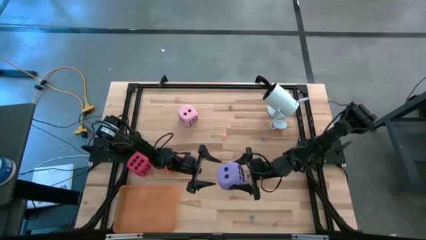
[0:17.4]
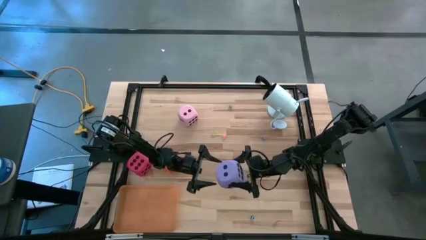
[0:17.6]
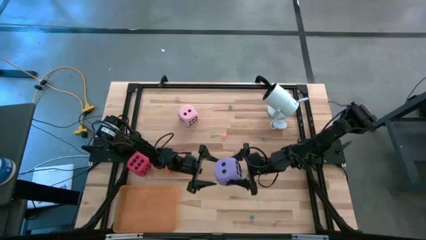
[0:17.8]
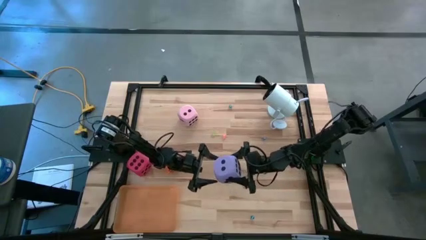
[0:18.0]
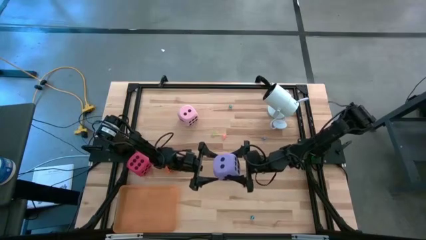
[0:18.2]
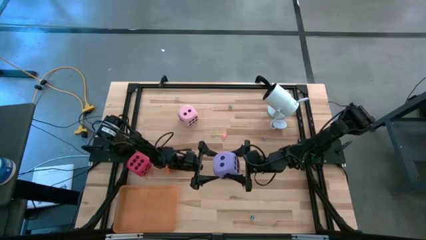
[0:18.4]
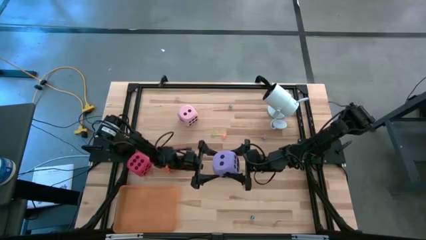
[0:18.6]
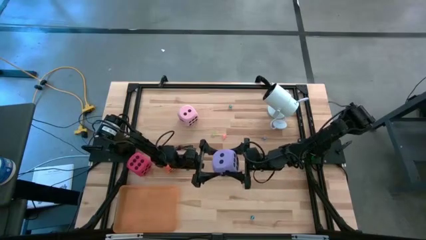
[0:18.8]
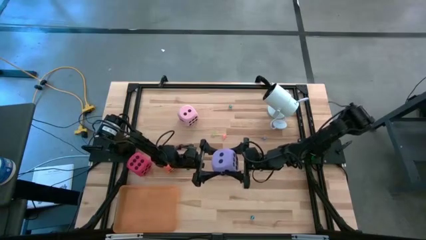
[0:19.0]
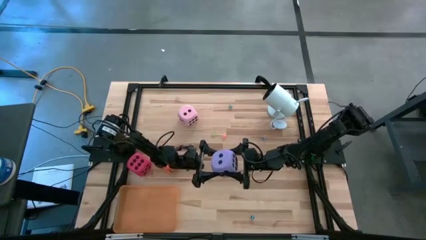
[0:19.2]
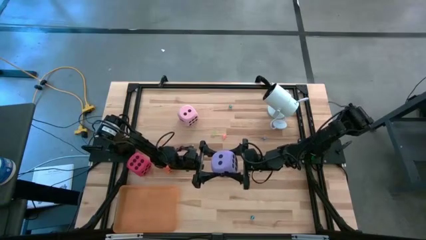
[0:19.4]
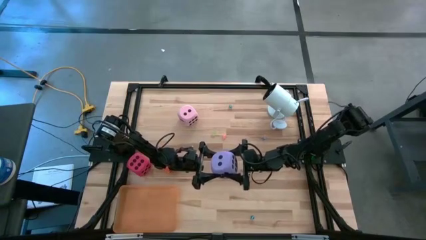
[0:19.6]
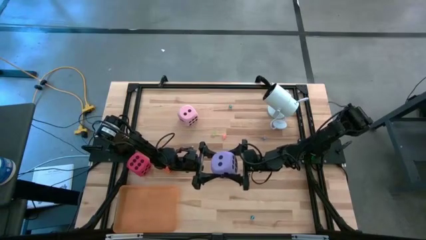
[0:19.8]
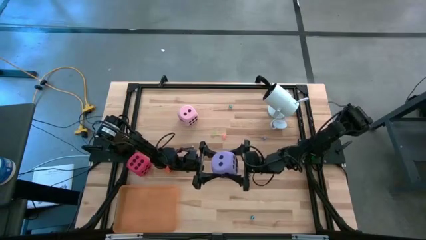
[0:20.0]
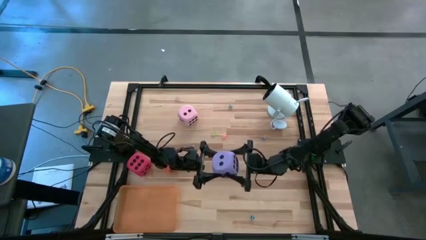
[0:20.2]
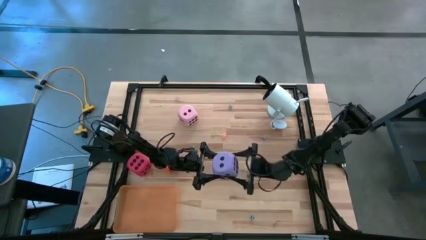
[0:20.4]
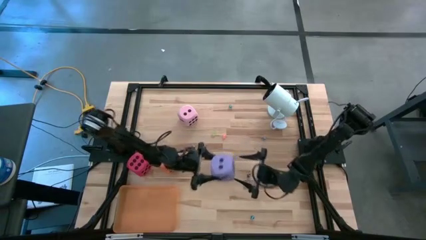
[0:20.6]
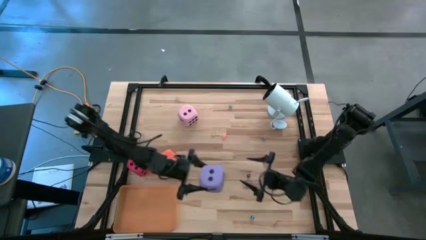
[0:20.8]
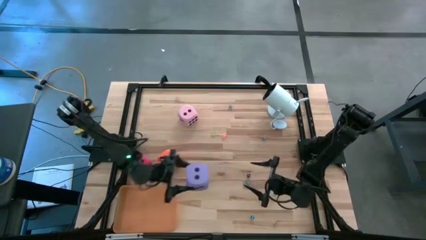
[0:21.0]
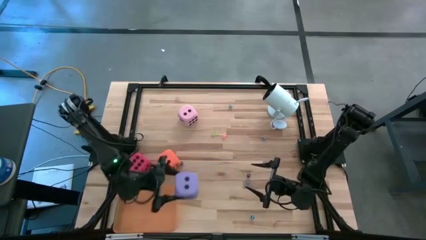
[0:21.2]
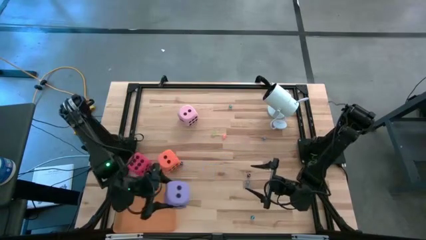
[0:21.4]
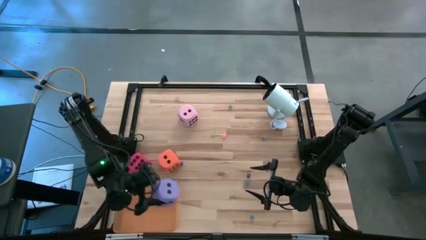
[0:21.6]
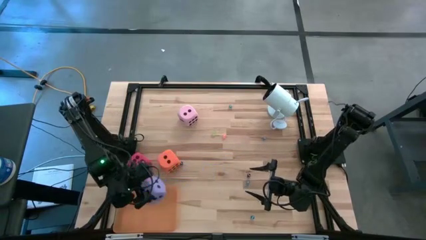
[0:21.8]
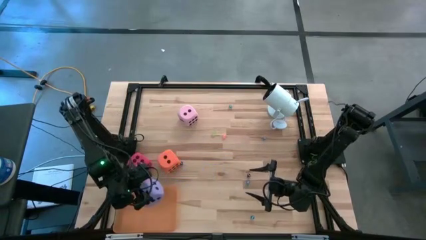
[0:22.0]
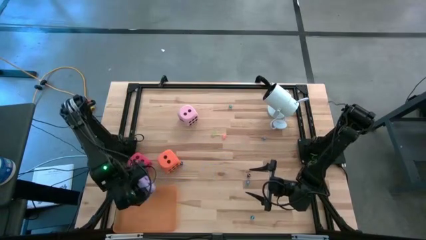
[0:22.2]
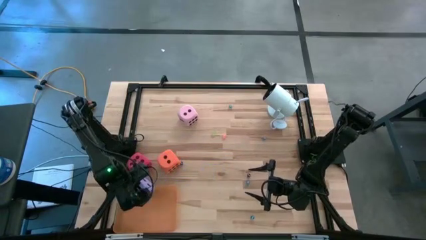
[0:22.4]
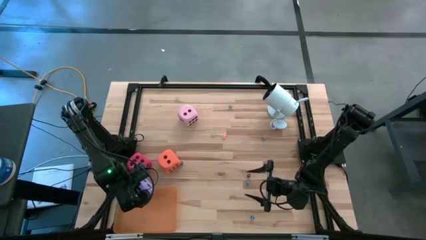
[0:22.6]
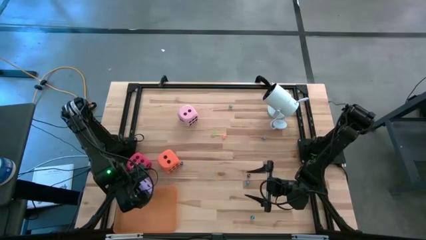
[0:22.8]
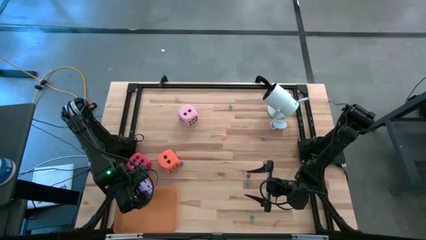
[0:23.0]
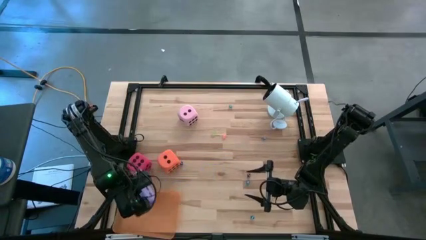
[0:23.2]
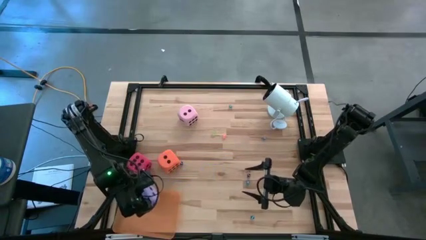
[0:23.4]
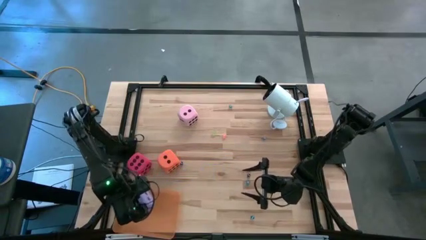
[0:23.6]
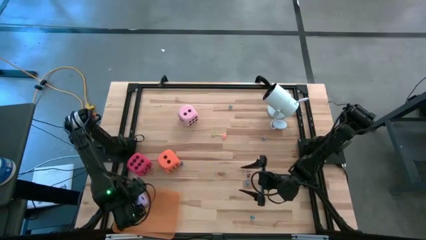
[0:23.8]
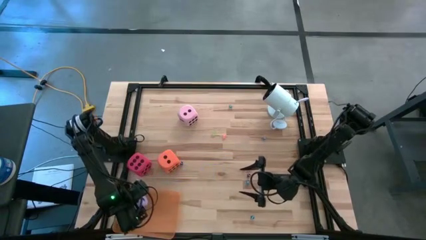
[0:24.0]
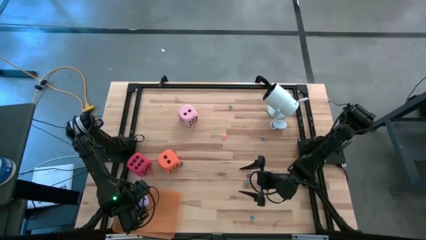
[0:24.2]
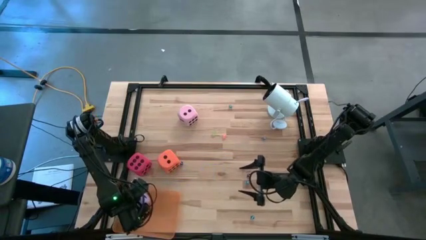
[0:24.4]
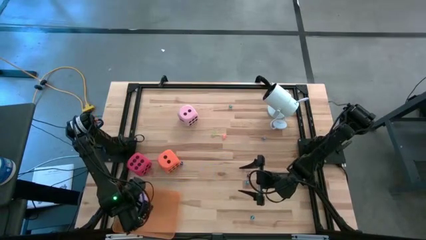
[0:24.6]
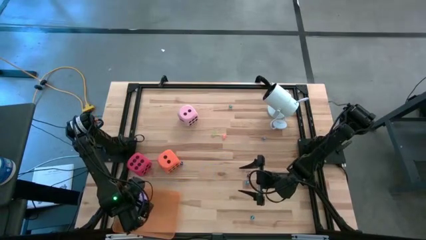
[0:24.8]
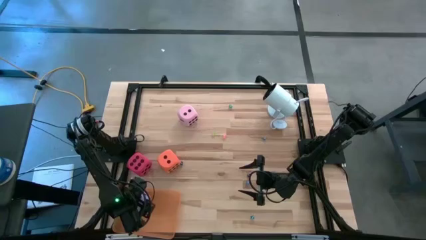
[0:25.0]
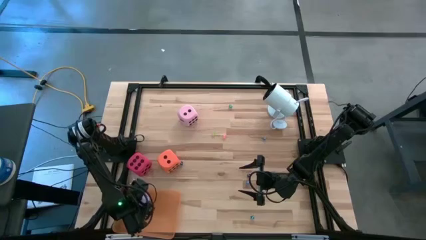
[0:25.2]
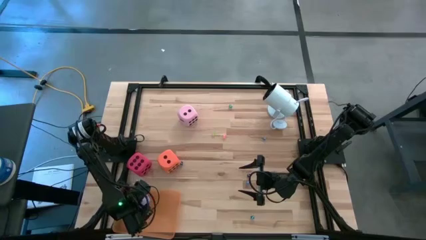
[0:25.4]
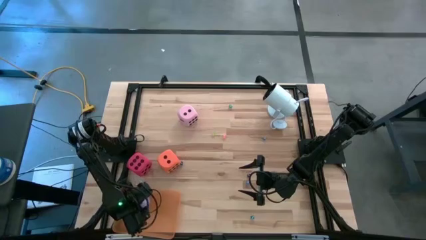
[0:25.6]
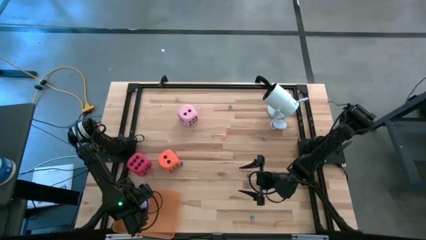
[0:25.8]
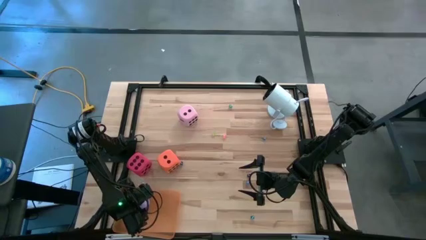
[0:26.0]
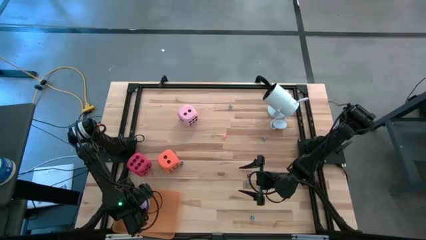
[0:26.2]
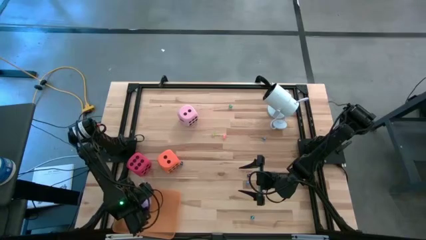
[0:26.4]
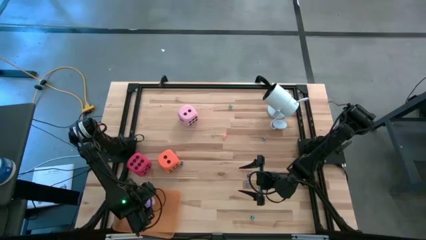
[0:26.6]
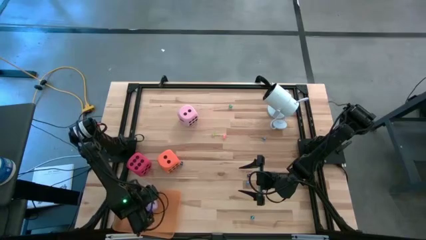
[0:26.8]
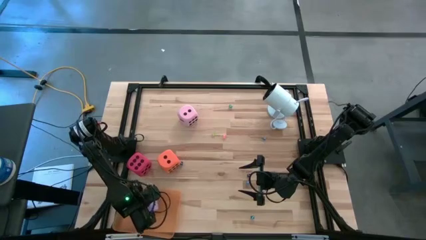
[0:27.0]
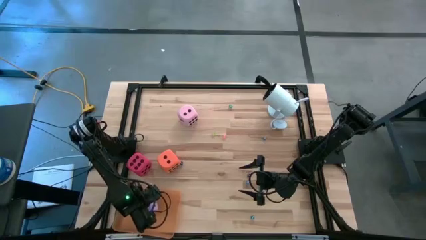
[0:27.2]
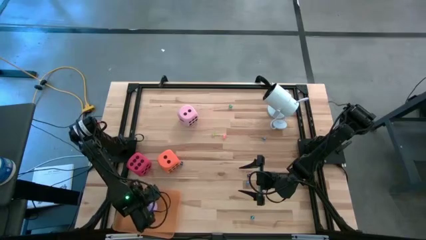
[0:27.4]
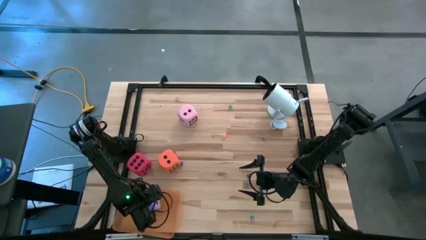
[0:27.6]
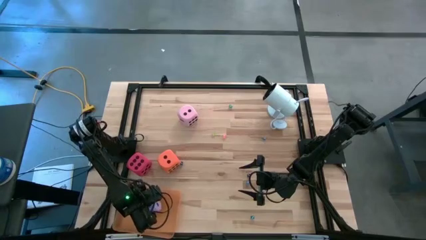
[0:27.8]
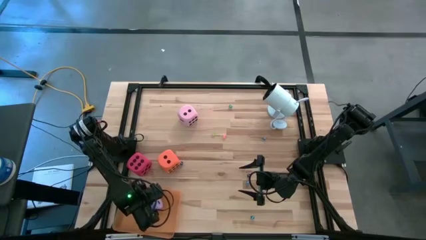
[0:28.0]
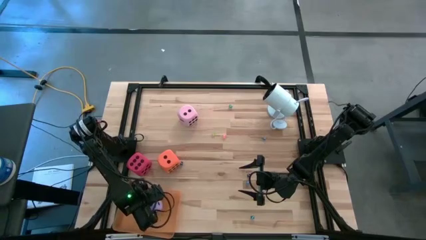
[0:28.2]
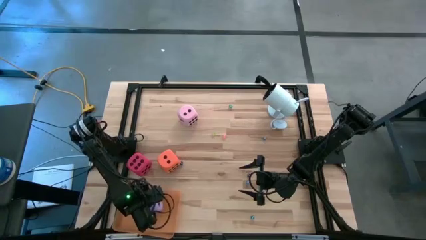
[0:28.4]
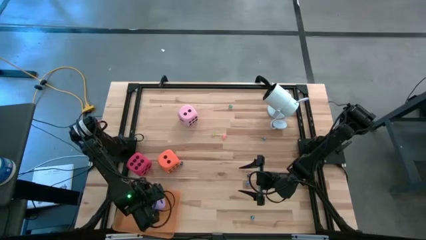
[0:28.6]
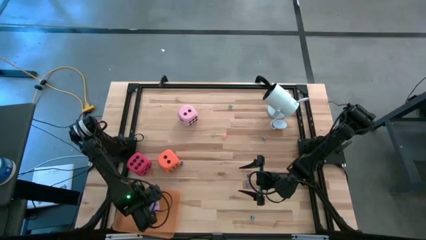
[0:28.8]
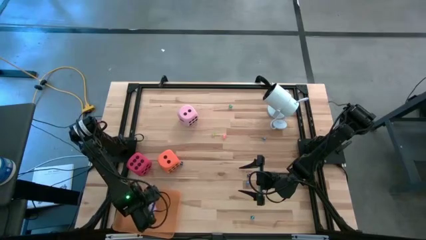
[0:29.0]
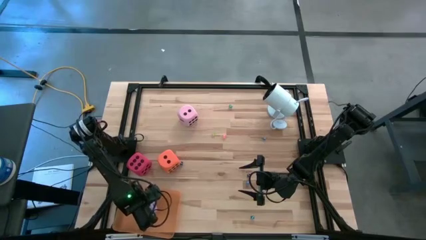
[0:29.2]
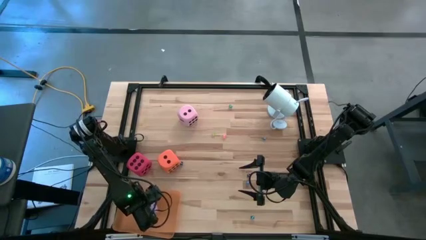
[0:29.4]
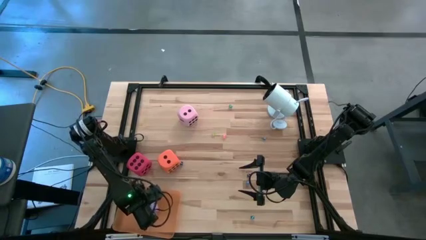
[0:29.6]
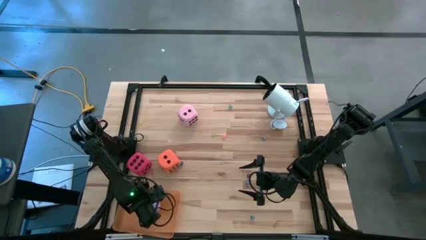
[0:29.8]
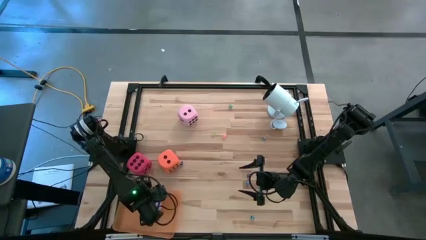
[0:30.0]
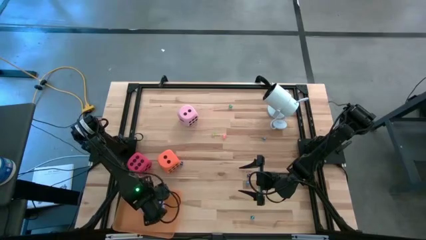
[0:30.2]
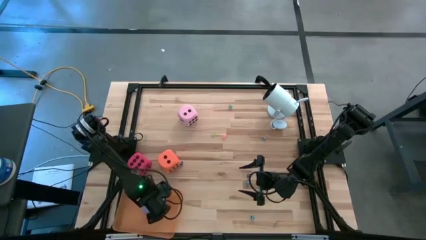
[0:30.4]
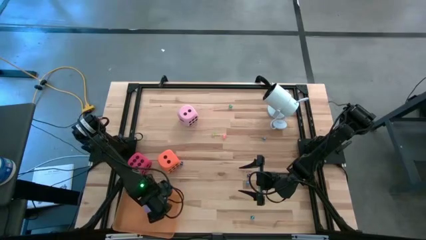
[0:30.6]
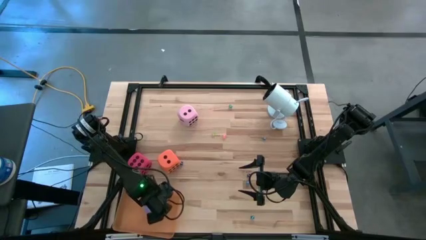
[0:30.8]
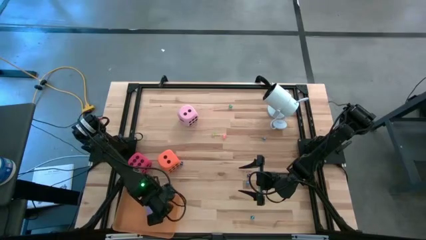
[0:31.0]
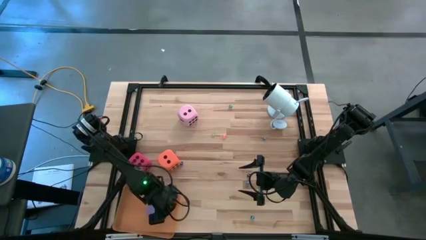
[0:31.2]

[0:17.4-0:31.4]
Task: Pick & Place Dice
Put the large purple dice into the orange bin

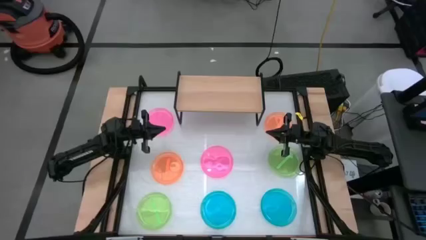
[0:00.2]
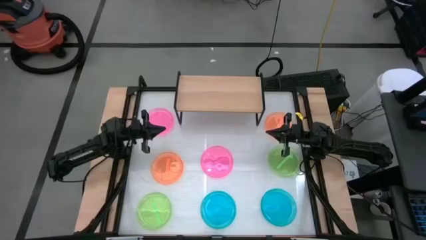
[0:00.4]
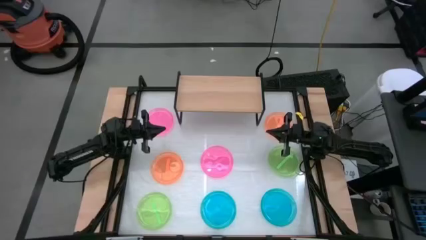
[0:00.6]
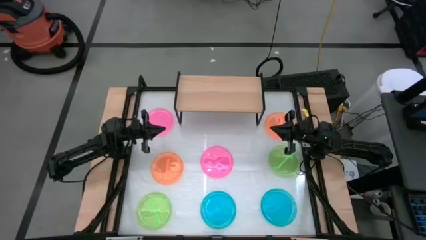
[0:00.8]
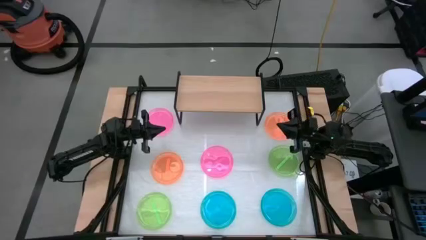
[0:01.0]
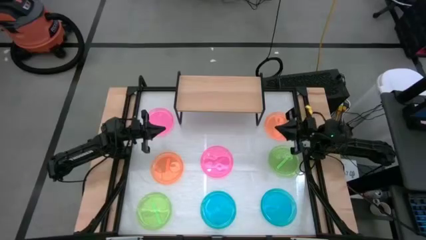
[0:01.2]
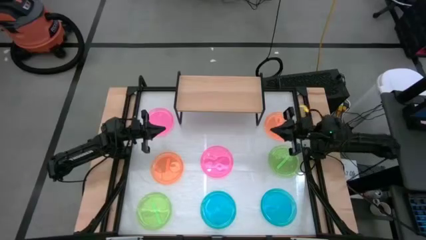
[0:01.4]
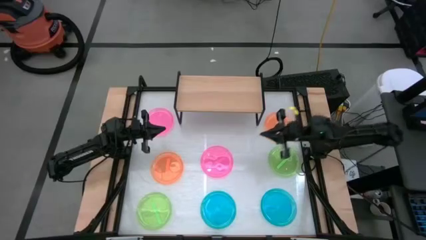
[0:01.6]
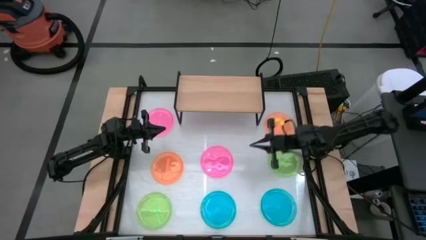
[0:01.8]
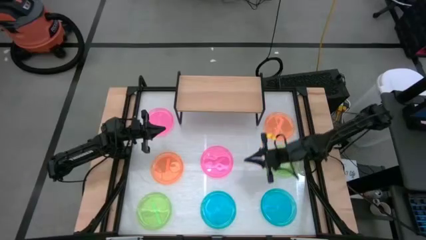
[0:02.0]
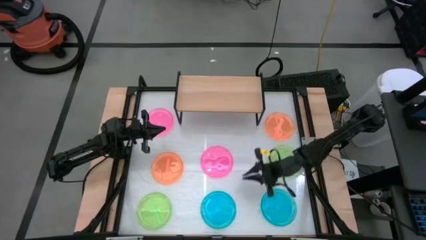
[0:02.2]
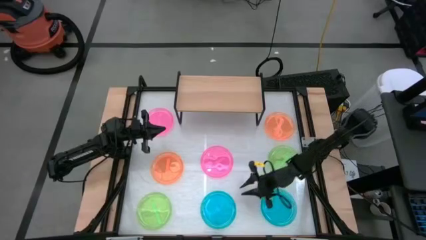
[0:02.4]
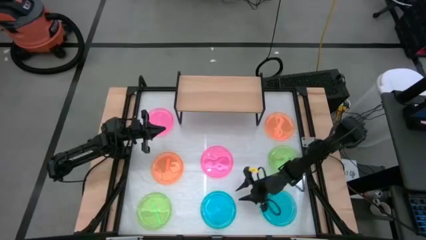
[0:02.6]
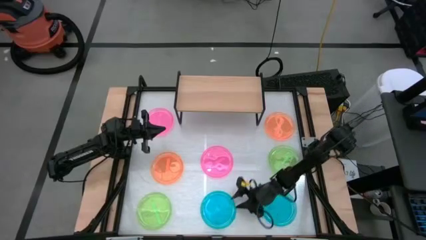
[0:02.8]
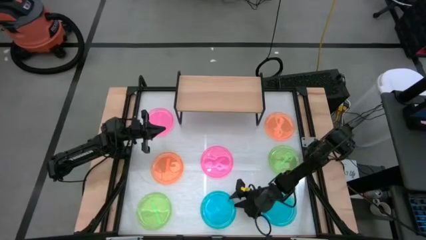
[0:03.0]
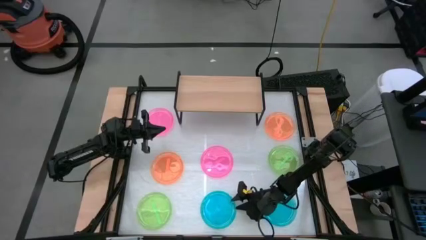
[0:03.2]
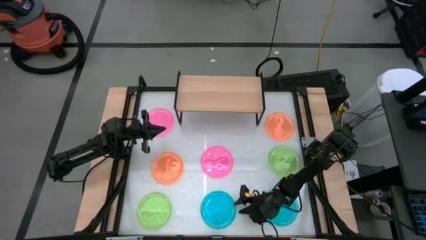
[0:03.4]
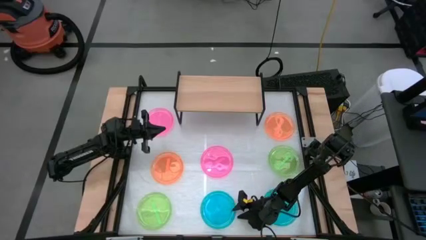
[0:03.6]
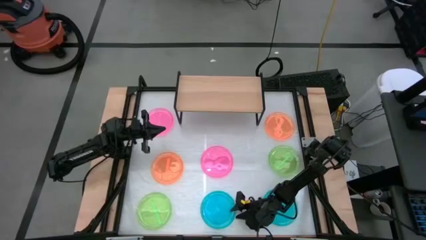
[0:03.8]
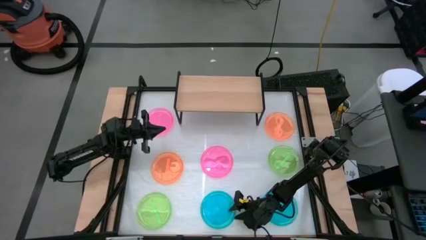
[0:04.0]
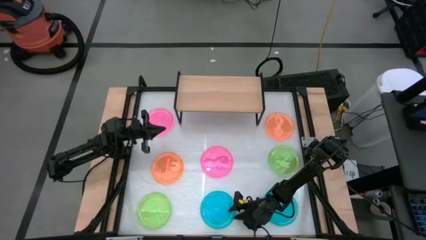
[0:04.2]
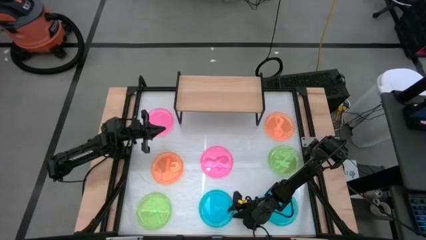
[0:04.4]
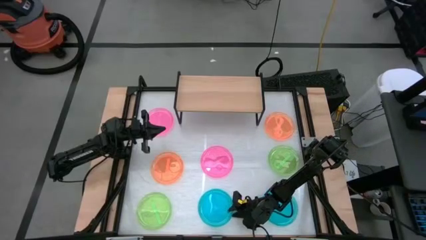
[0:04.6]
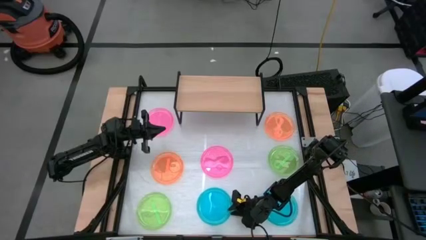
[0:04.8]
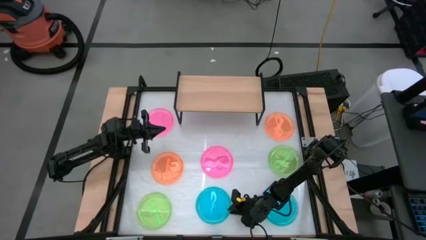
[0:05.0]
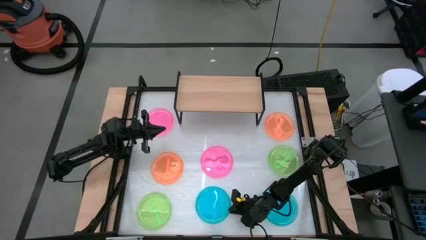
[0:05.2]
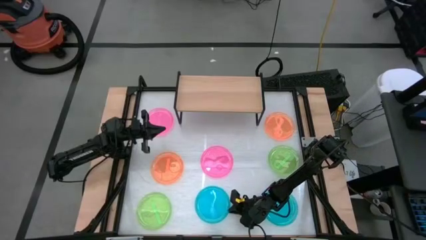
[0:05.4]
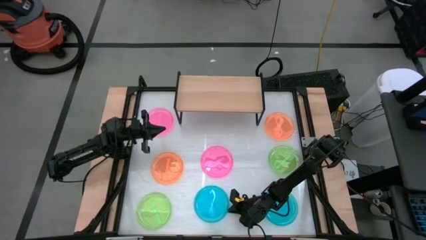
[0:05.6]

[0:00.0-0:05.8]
Task: Place and stack plates onto a shelf
Put the left blue plate on the shelf
